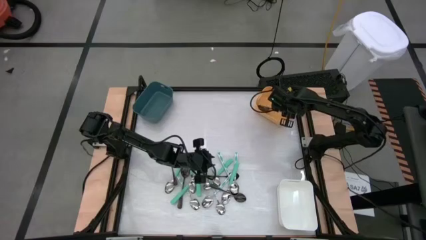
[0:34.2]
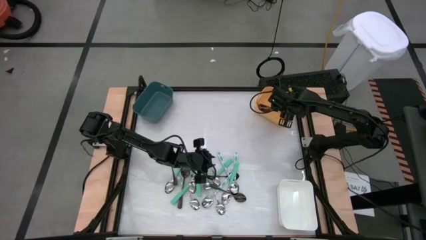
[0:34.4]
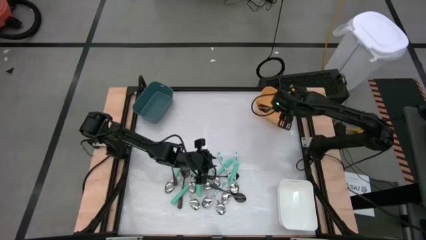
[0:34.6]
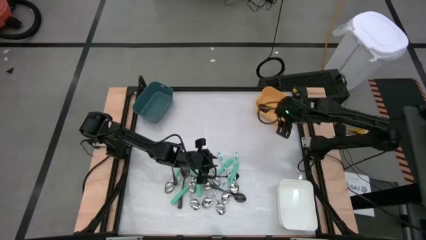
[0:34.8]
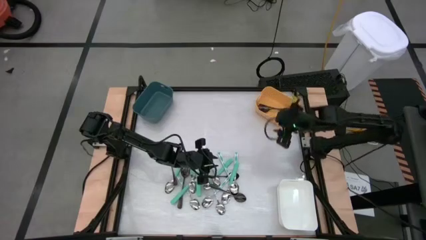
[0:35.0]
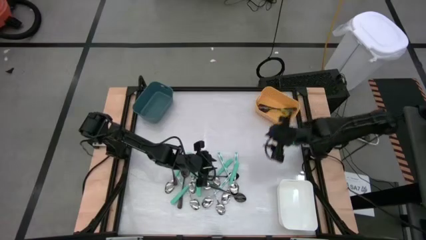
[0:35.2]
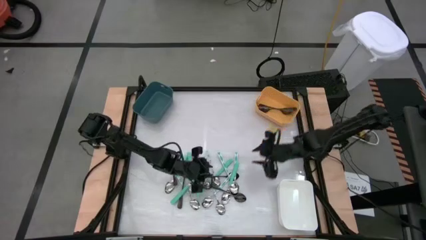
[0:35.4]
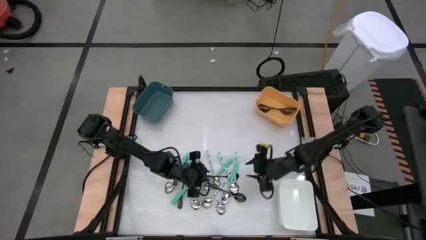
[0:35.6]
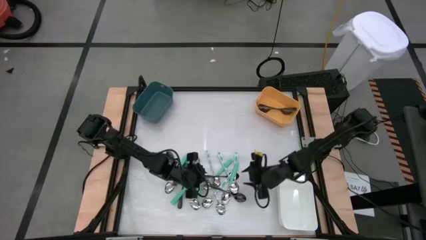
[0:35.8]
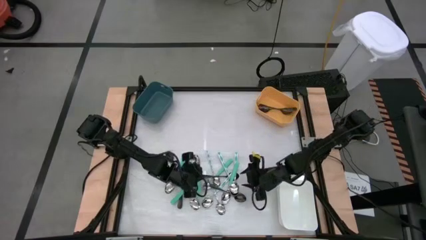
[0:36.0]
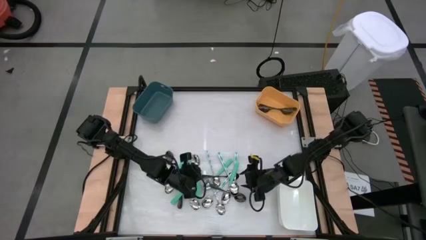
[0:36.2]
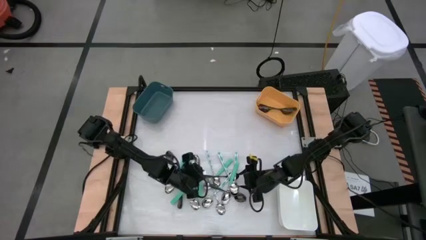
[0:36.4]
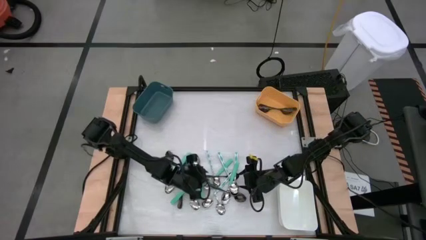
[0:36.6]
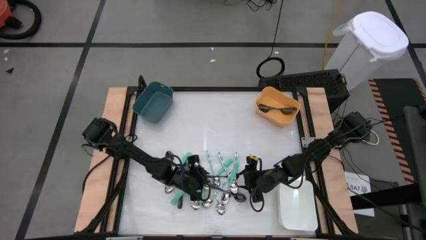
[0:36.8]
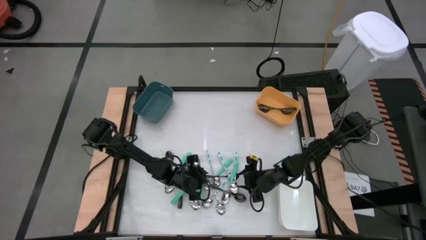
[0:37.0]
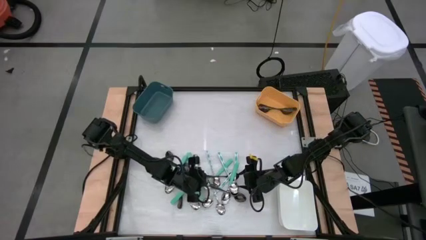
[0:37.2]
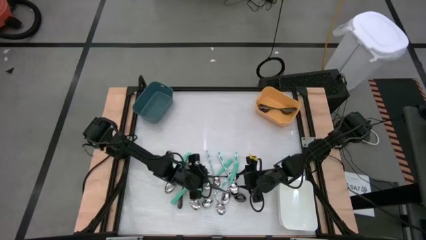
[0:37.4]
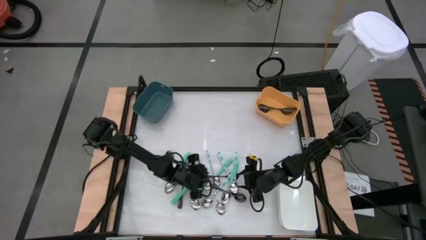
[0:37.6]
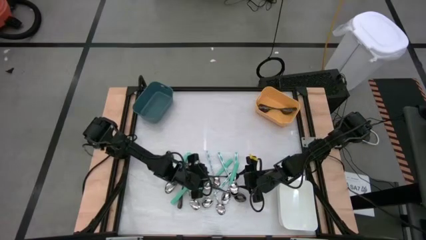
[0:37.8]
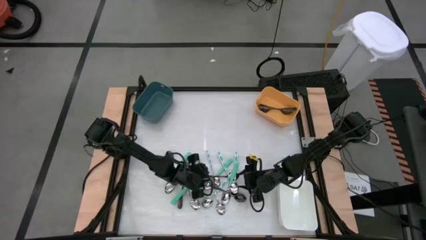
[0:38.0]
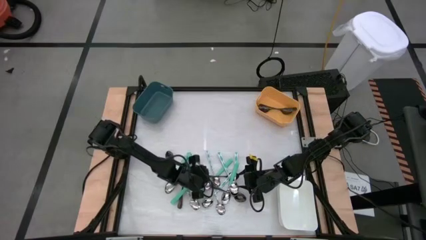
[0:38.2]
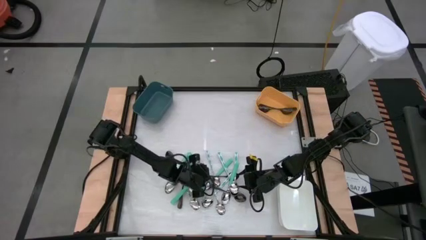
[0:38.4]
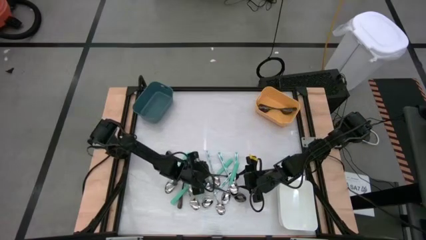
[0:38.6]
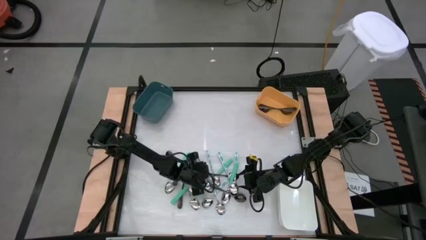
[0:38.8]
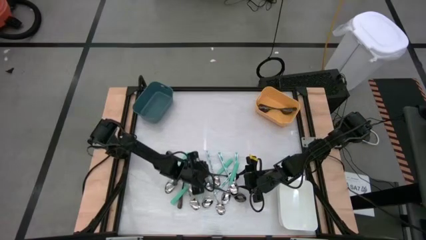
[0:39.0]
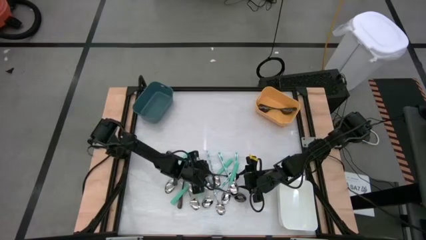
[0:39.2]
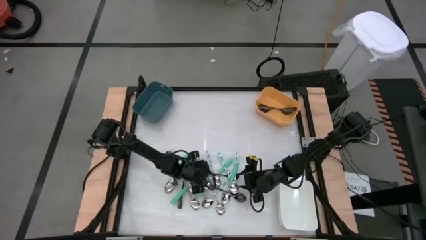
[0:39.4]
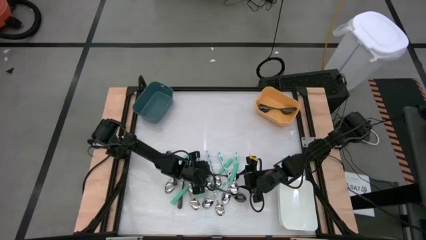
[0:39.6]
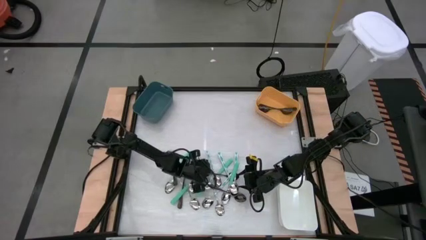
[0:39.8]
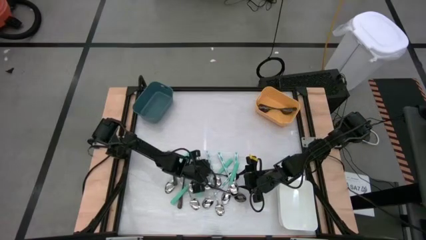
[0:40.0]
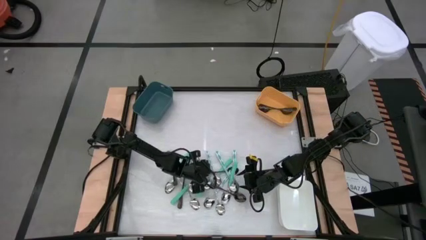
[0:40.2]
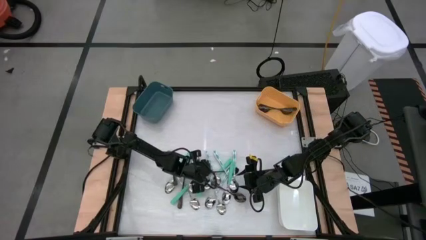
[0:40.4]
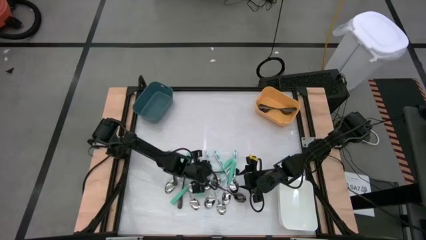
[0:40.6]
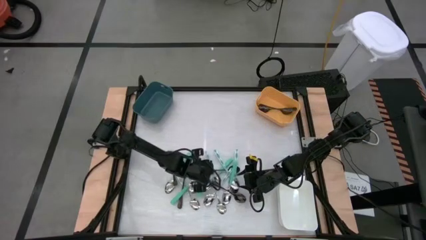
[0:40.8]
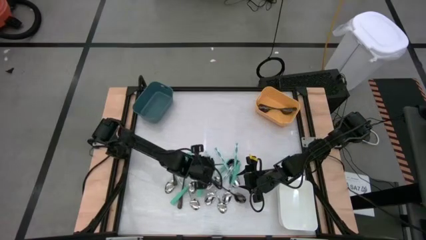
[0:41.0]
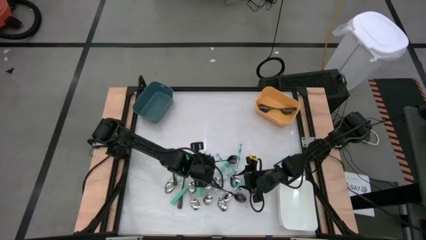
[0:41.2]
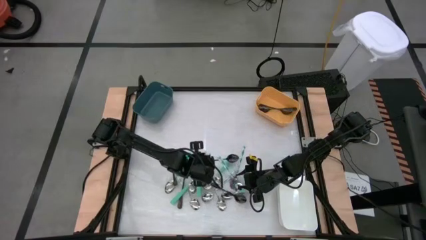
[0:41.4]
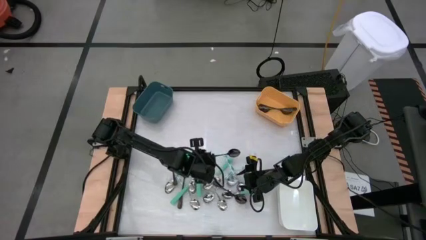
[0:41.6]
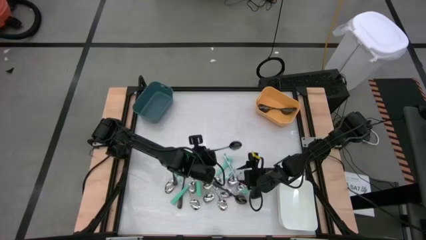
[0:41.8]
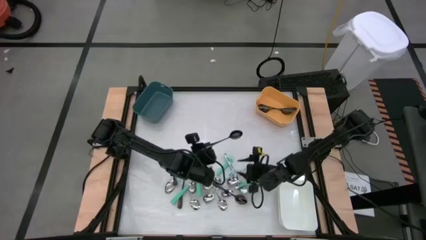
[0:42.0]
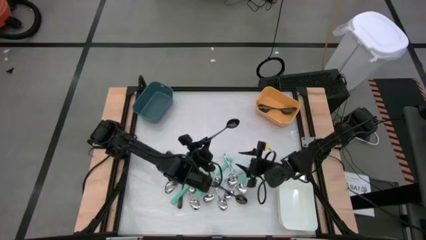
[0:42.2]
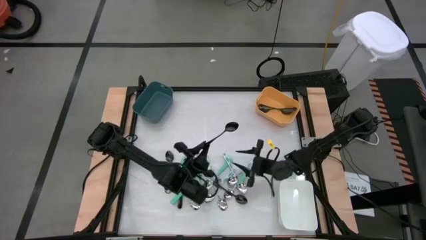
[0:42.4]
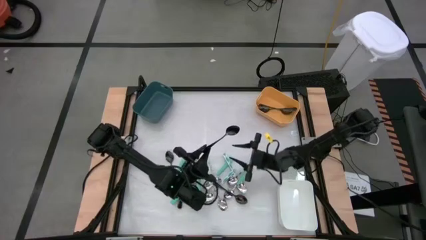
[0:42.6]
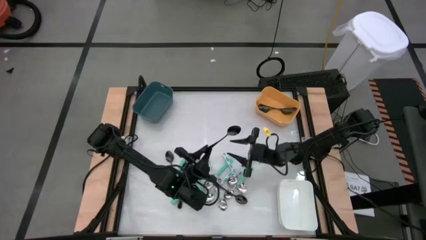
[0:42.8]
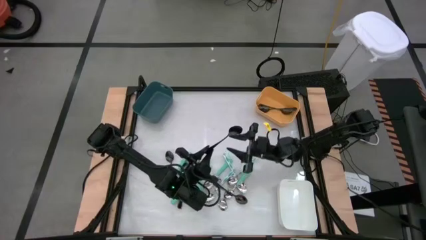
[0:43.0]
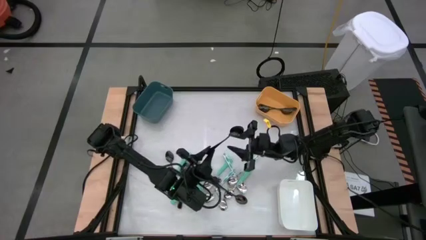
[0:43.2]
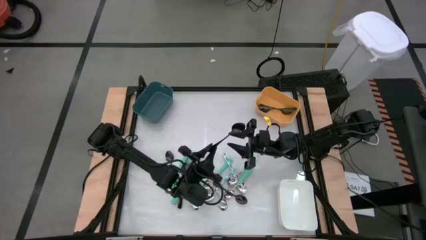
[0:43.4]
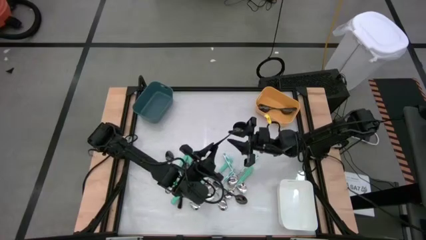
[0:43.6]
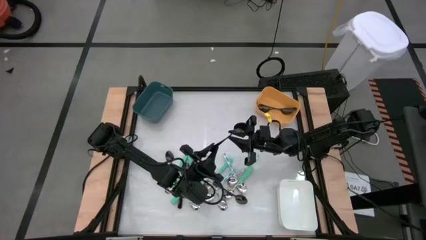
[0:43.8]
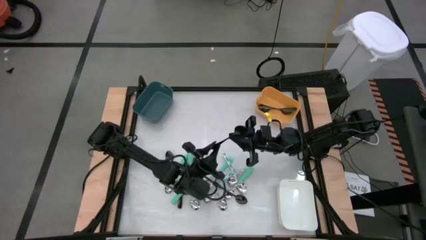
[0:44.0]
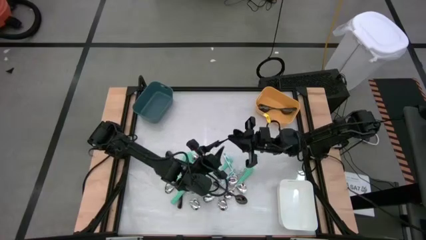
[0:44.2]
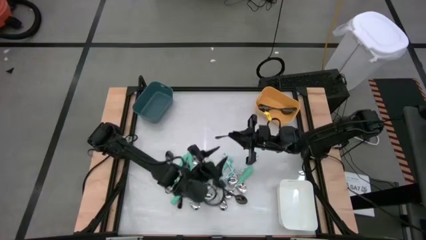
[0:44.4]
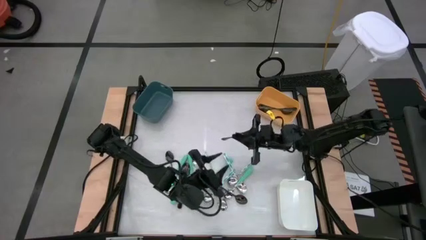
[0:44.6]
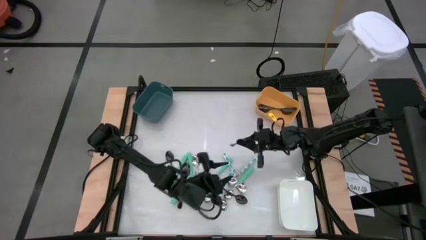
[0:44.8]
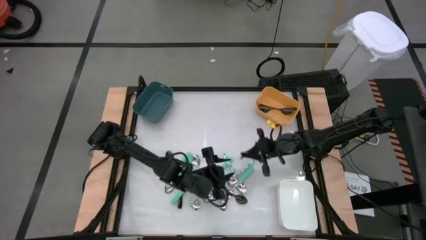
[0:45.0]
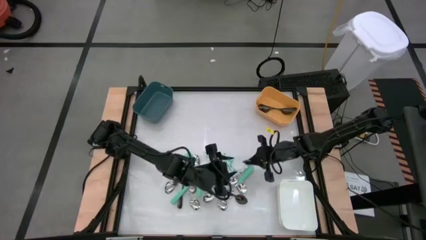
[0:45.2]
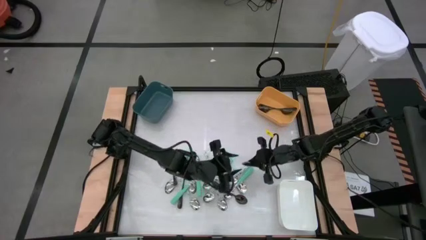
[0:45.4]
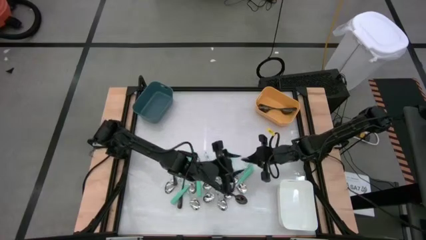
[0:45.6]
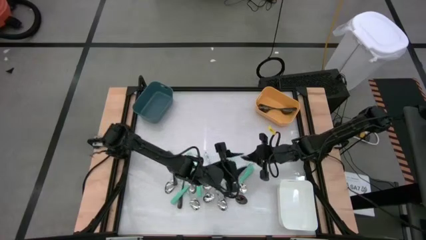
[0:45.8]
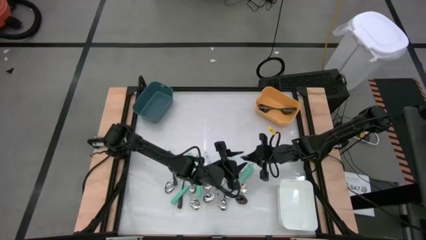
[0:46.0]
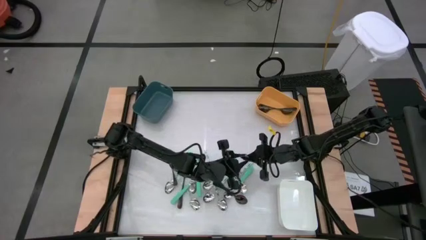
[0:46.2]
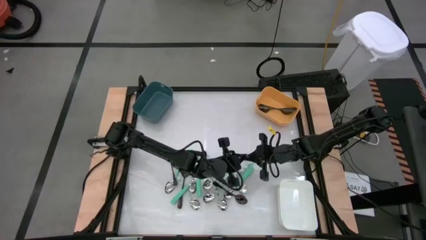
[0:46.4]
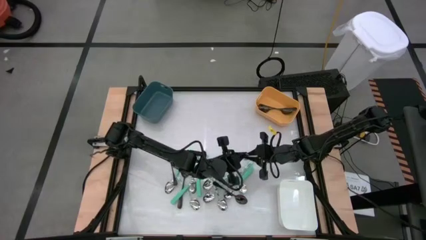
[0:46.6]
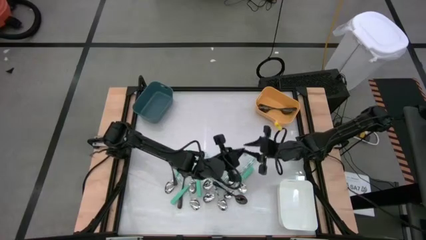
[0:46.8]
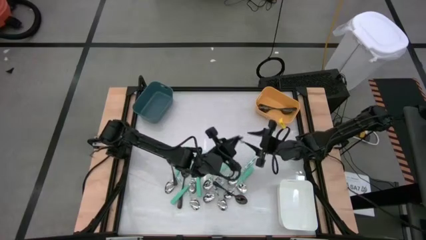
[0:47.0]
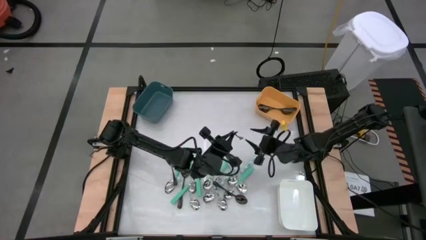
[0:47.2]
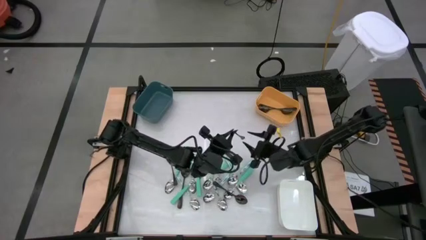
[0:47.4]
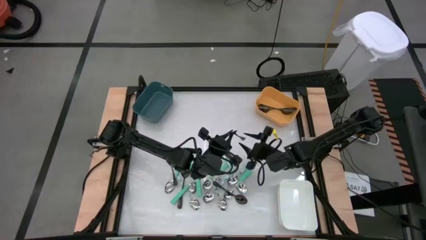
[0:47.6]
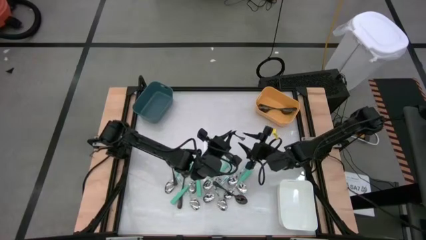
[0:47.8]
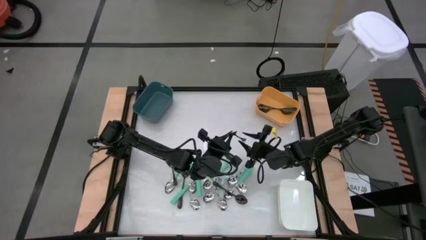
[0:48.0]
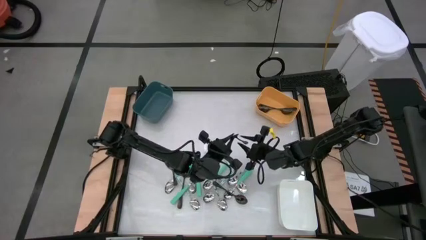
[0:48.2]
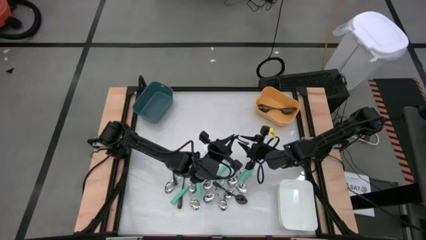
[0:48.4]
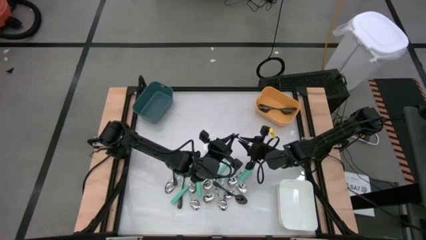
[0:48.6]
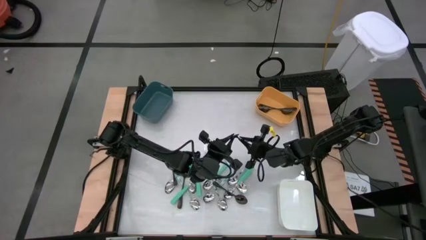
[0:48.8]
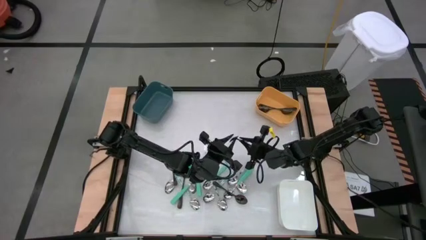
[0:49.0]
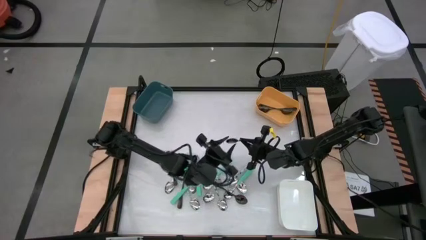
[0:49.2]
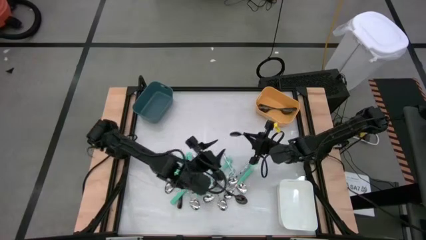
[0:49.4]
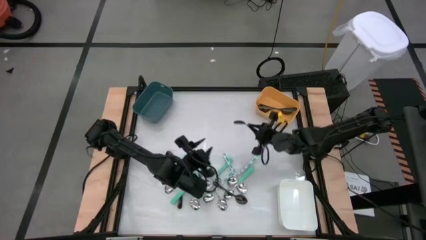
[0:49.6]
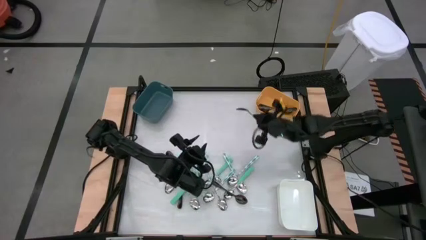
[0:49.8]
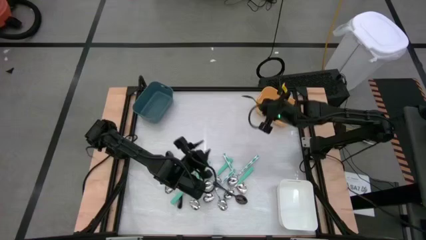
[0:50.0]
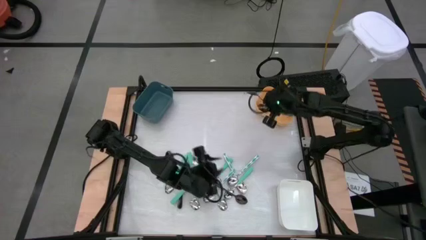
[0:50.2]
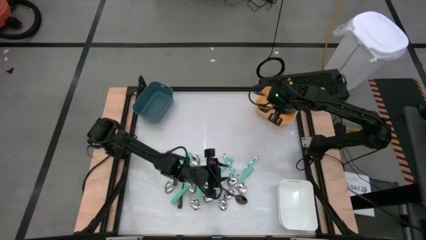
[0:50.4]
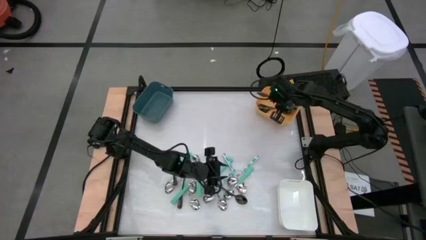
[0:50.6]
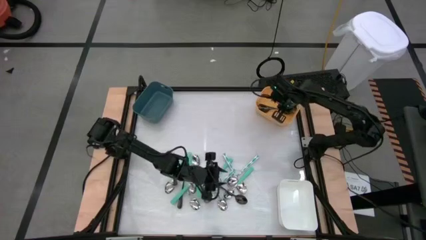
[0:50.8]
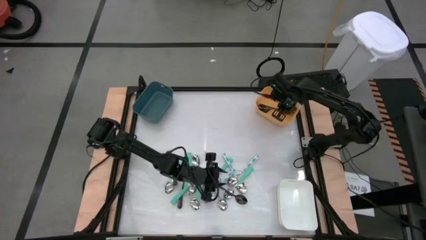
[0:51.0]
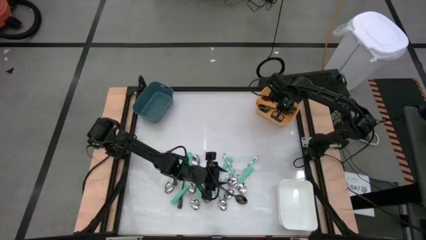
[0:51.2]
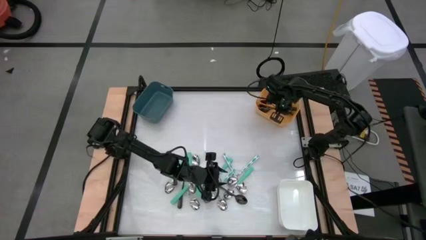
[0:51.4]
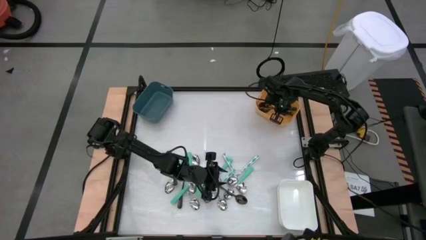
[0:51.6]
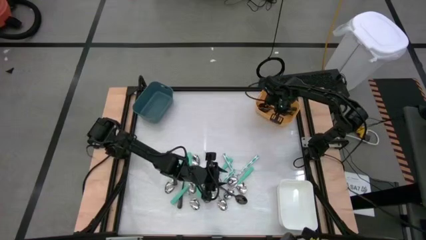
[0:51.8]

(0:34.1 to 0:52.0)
Task: Sort silverware by color (type)
Put the black spoon into the yellow bin
